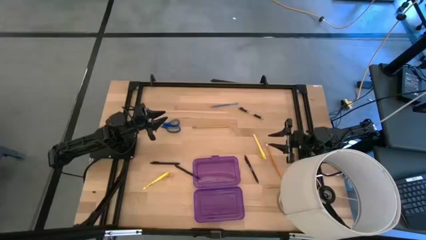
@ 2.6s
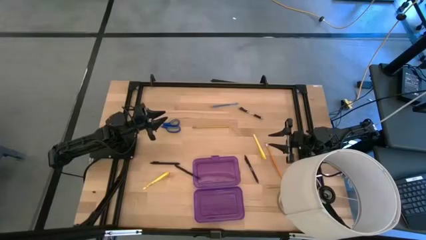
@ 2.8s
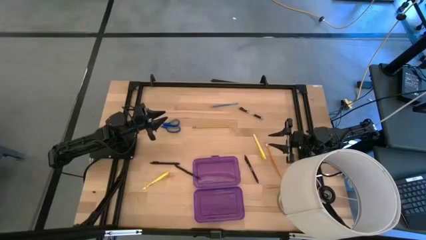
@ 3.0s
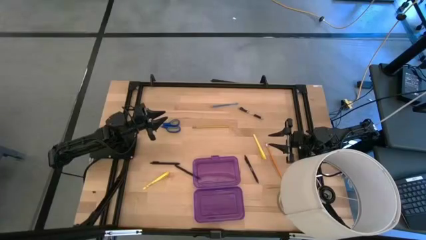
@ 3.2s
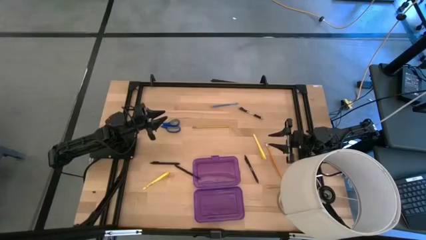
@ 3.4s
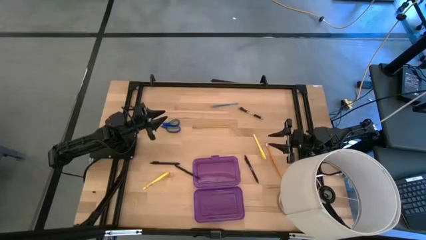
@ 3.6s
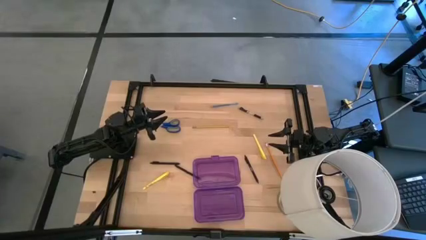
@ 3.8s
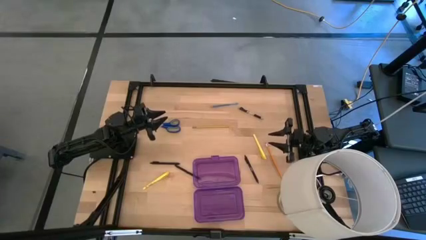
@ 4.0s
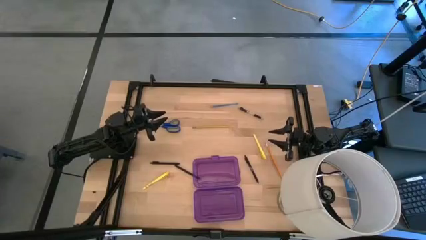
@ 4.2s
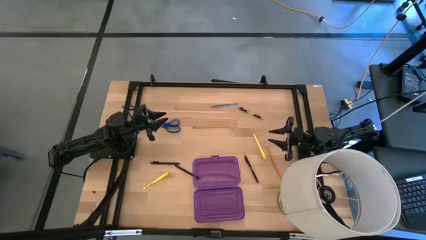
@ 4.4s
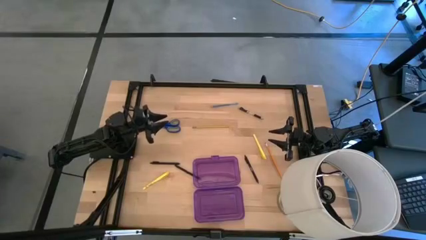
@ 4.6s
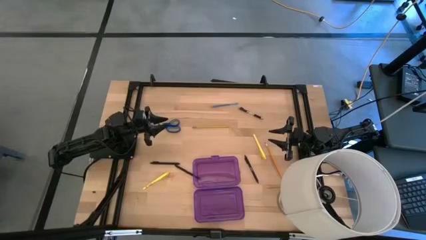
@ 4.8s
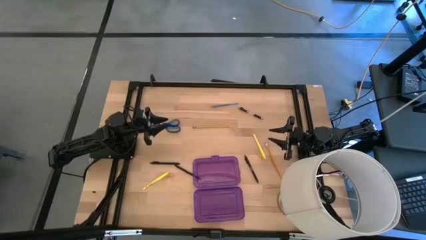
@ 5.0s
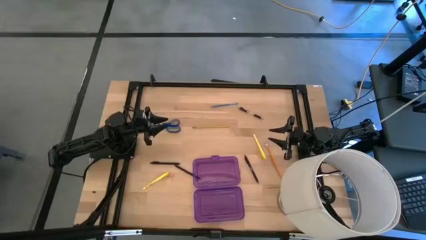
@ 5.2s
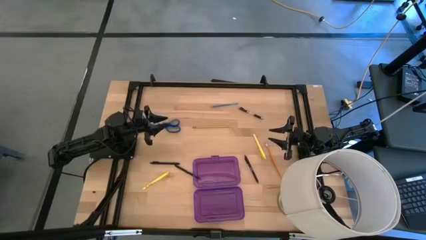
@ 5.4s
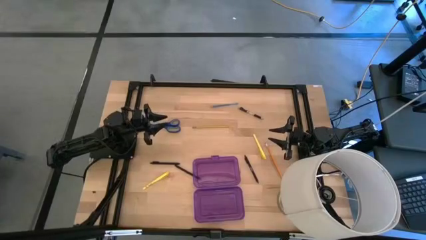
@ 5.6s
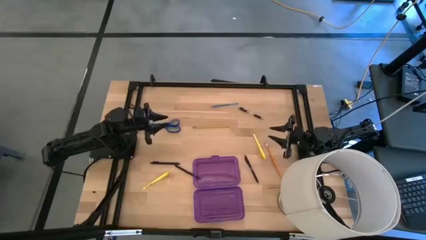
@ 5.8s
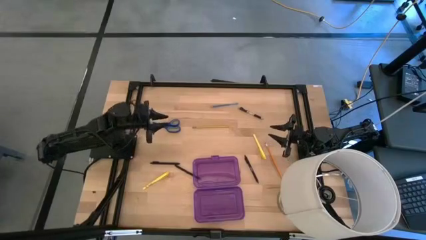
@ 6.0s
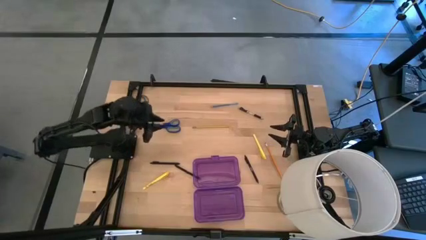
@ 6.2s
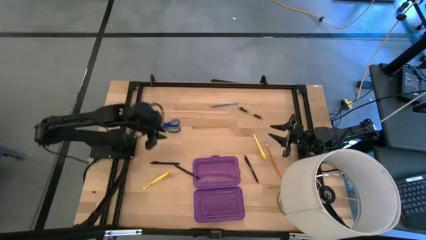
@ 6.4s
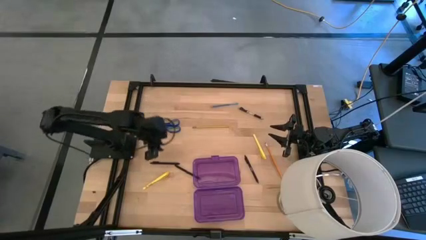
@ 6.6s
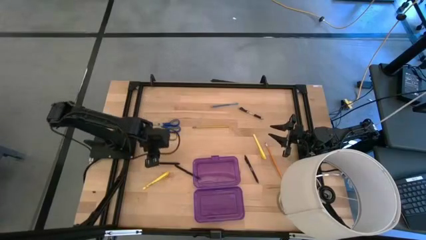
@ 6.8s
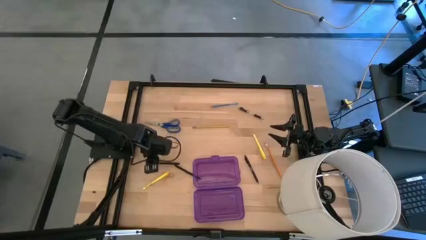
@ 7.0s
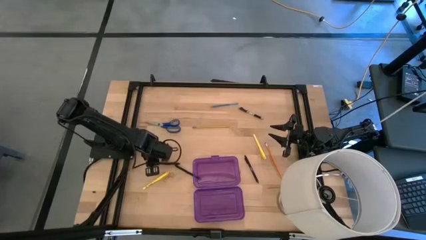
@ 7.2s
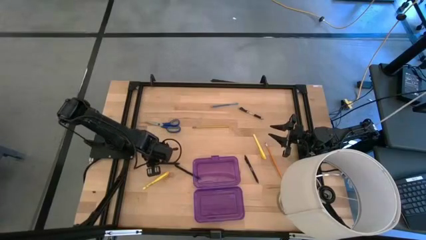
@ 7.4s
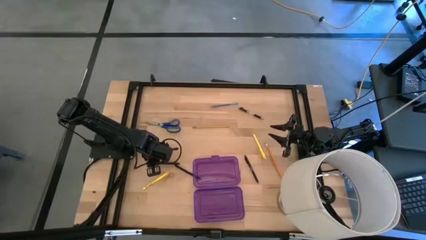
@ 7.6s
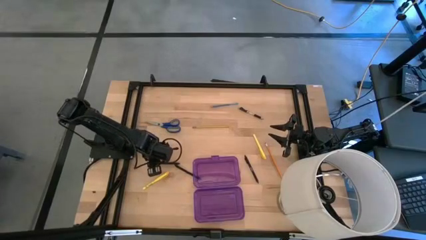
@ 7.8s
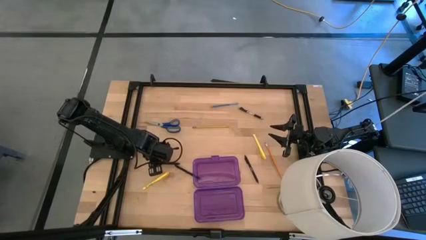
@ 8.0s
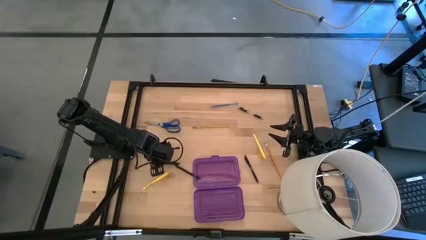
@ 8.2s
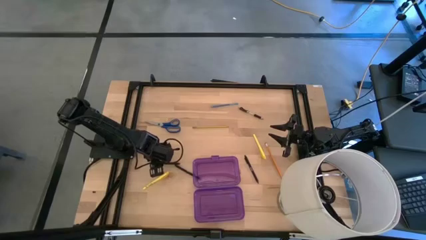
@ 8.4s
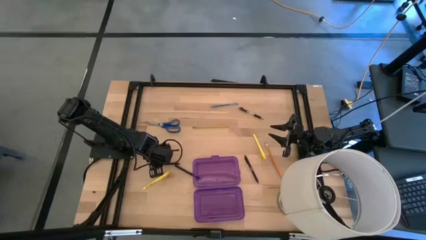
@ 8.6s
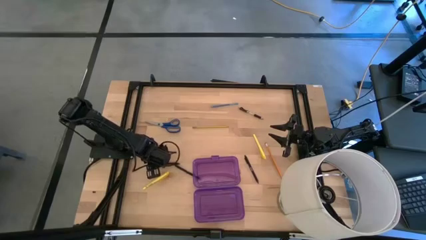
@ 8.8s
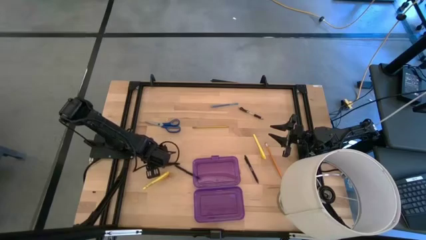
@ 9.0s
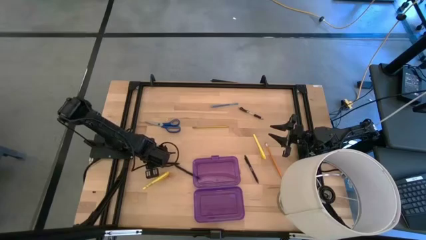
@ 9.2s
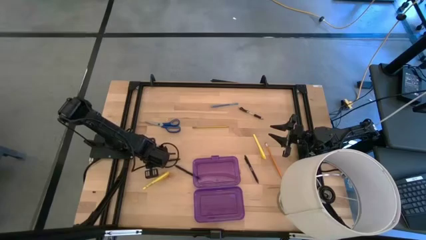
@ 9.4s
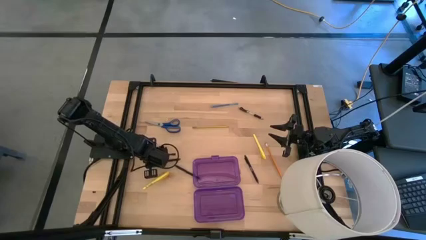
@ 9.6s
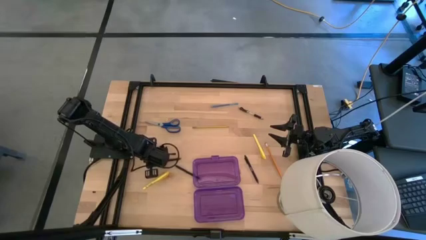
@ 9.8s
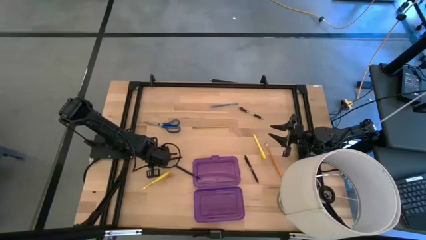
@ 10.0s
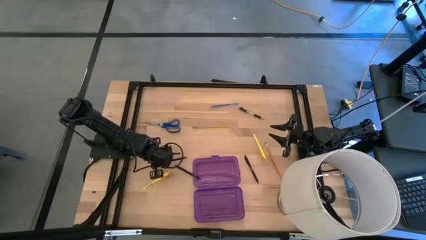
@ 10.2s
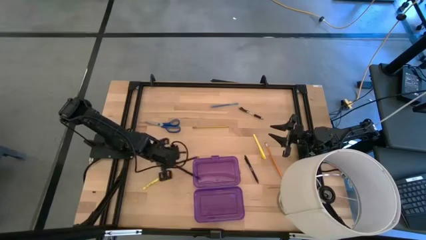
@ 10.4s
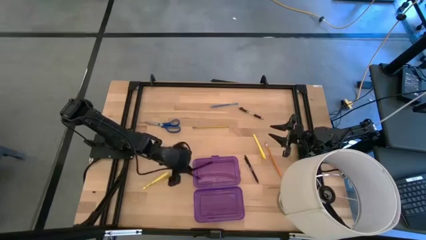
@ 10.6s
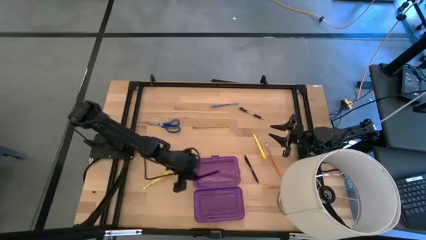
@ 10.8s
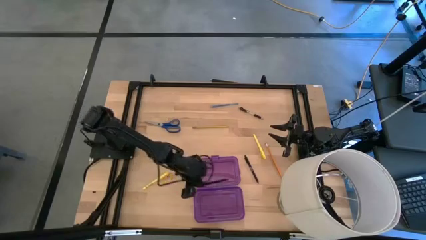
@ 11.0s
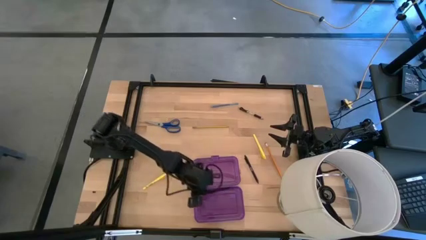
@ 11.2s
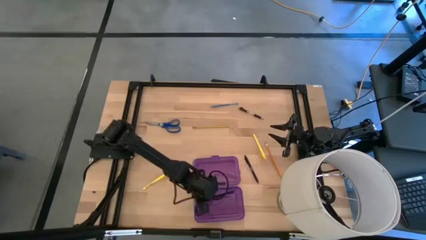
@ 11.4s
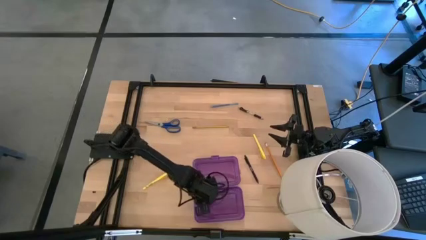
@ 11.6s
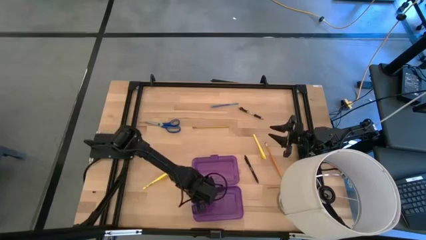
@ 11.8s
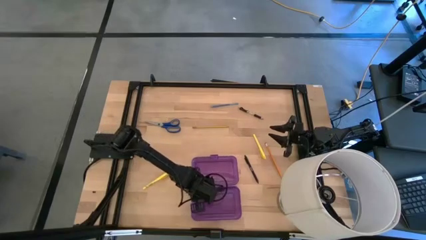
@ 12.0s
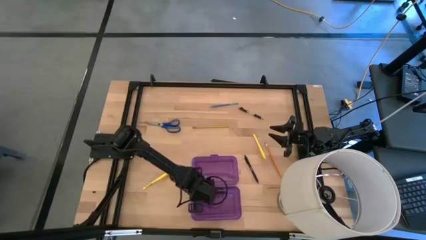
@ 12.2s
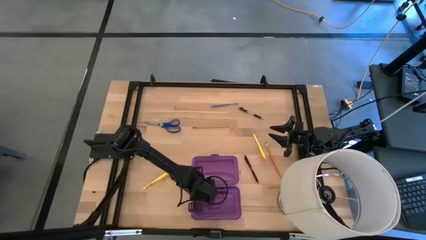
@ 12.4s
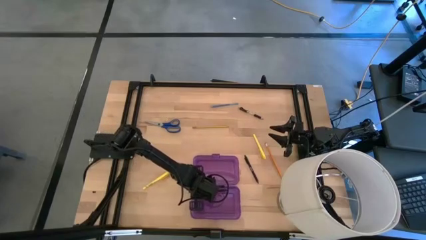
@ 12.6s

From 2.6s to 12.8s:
Task: Pick & place school supplies into a supply box
Put the top left black pen into the violet supply box

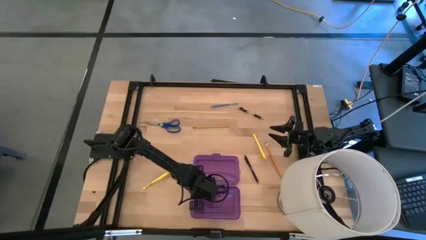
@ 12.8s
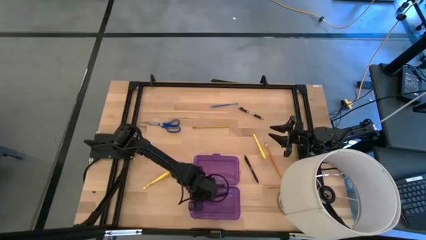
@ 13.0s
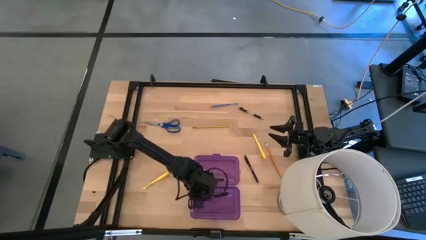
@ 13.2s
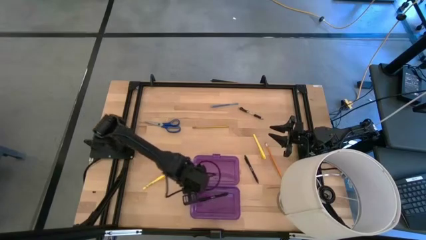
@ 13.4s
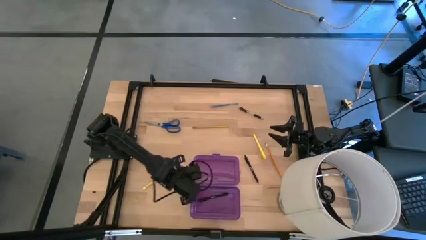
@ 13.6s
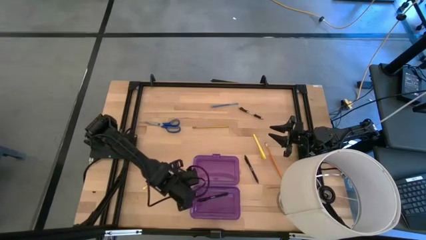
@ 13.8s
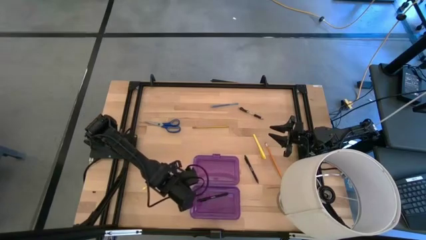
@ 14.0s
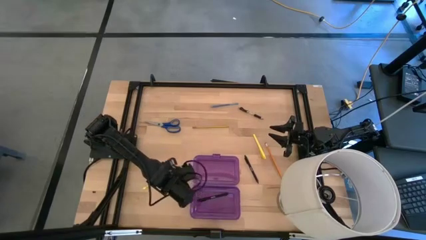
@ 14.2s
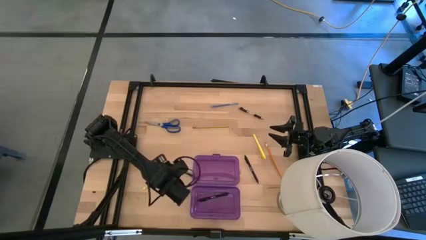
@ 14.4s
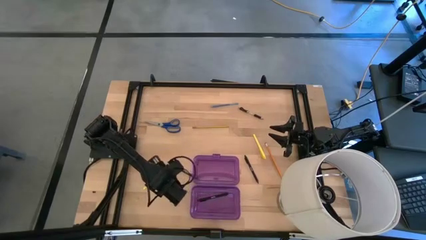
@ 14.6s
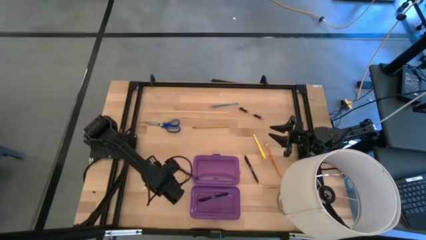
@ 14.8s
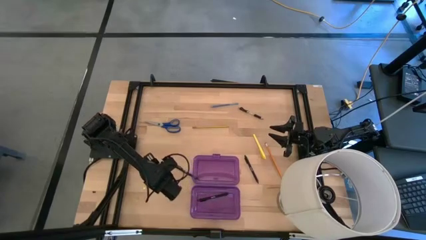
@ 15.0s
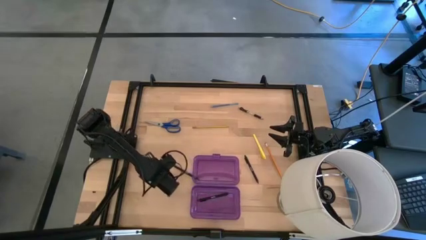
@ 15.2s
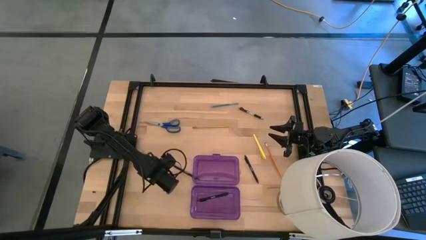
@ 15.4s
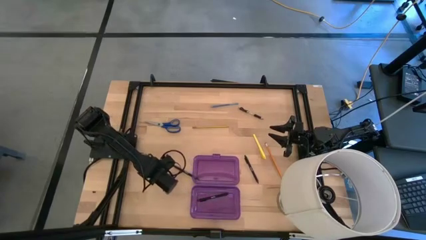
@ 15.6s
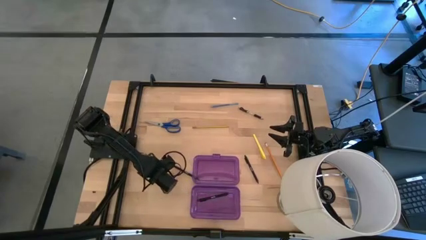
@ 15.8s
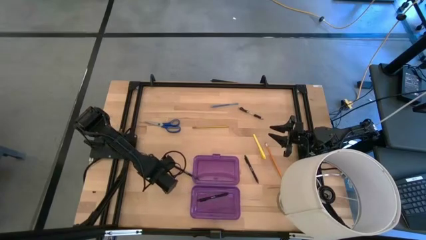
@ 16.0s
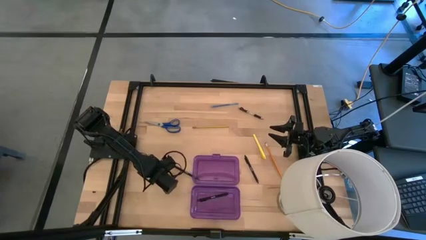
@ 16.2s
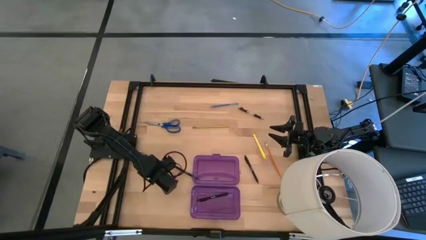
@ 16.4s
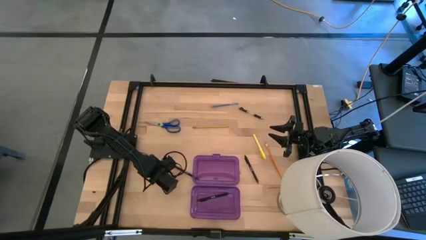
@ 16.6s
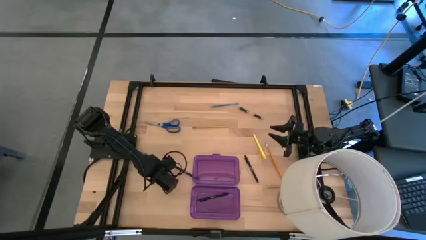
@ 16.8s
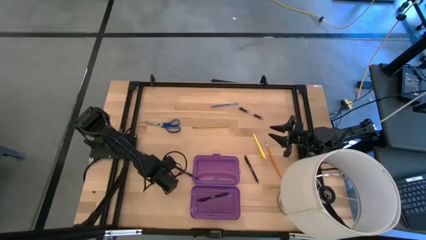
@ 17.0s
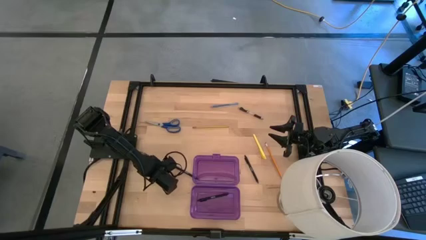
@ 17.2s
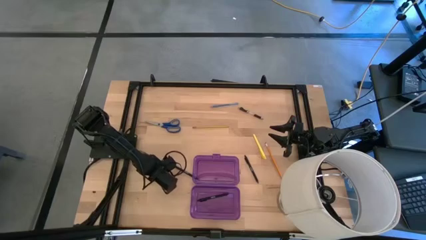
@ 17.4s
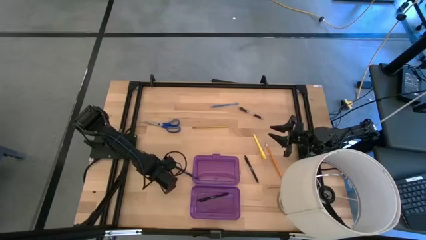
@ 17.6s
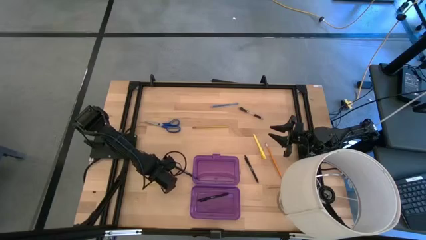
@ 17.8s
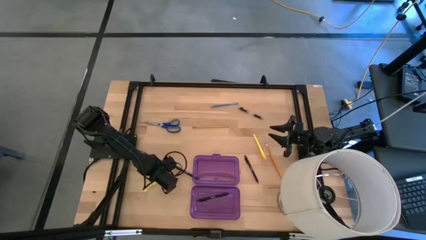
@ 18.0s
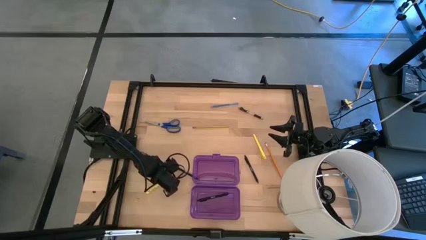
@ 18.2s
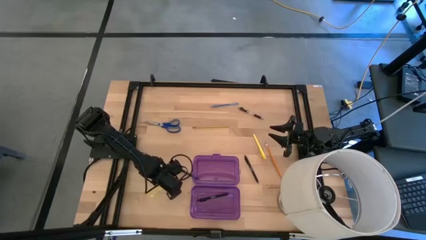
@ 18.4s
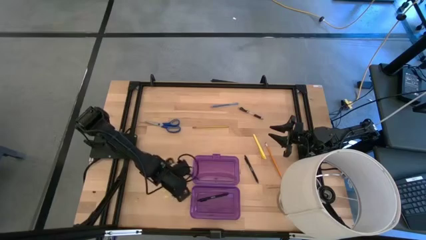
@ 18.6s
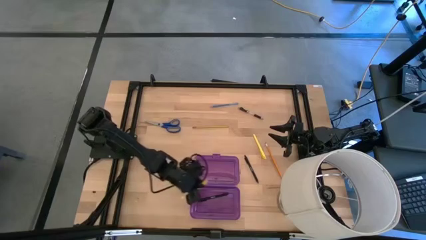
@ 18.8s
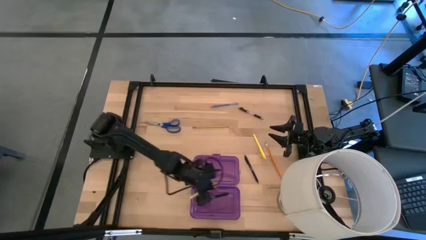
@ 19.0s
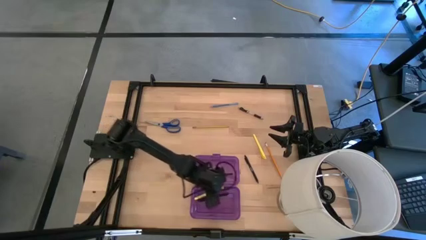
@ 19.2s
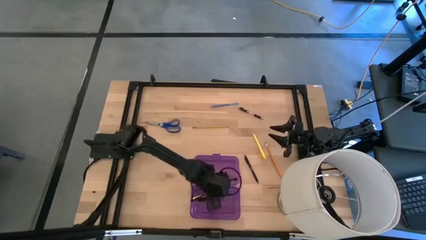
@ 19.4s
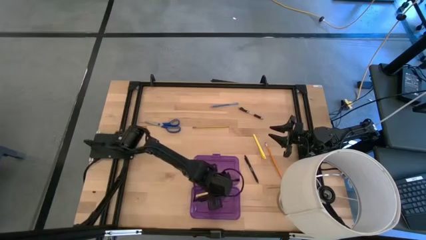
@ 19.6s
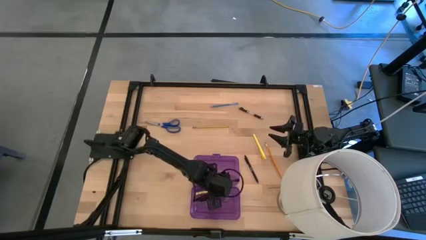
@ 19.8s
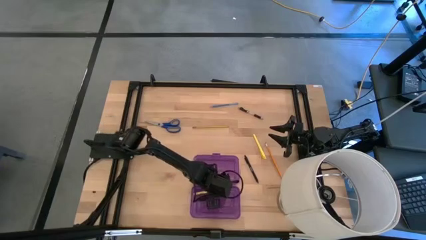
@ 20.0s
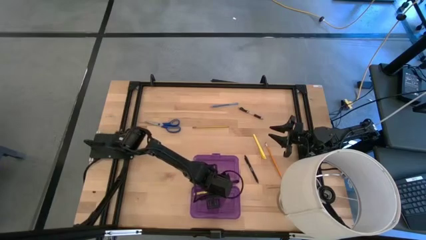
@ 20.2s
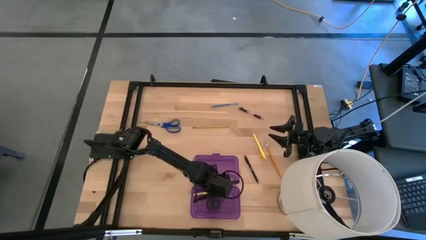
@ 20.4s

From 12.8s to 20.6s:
Put the bottom yellow pen into the violet supply box
